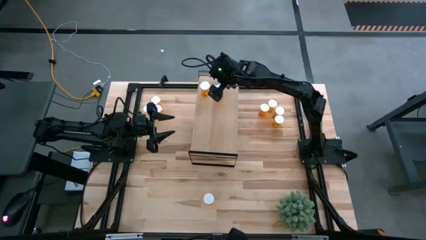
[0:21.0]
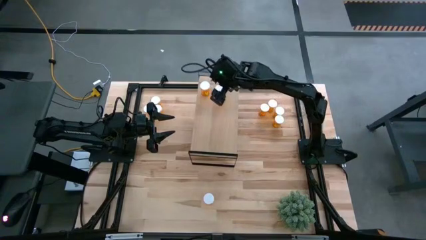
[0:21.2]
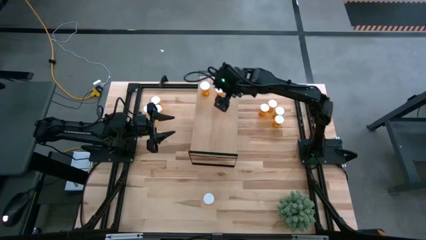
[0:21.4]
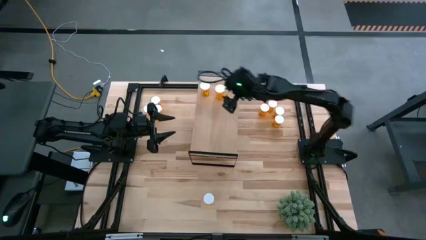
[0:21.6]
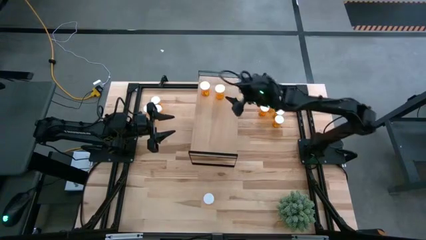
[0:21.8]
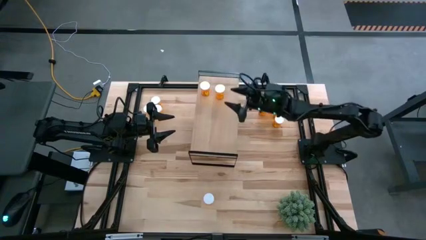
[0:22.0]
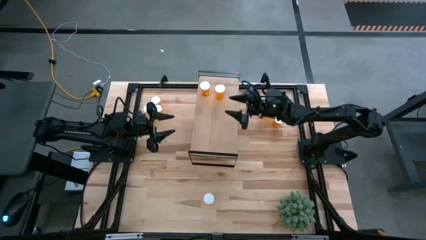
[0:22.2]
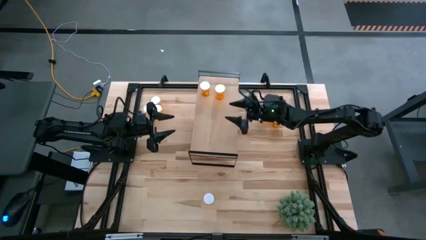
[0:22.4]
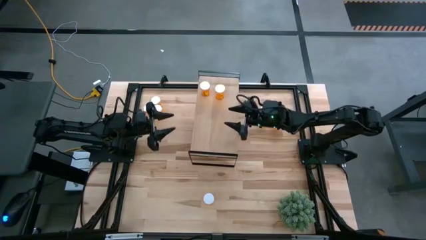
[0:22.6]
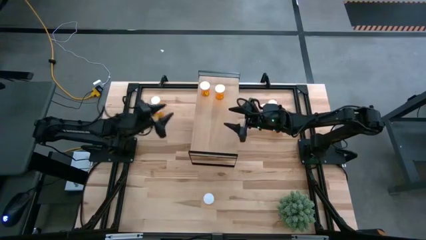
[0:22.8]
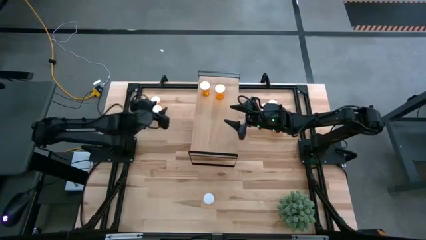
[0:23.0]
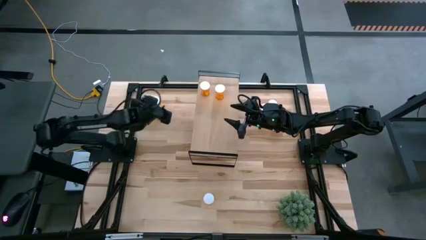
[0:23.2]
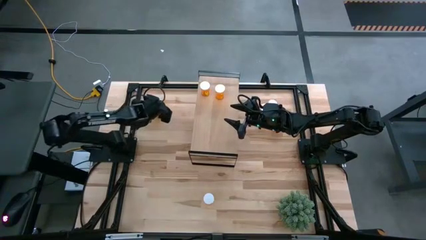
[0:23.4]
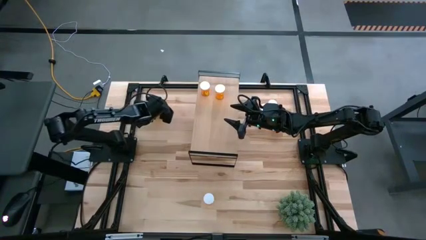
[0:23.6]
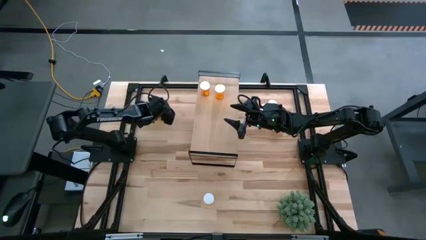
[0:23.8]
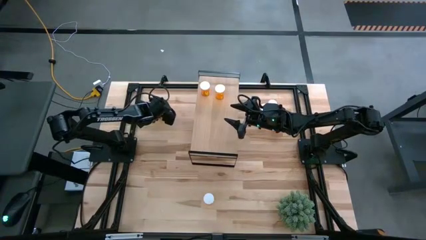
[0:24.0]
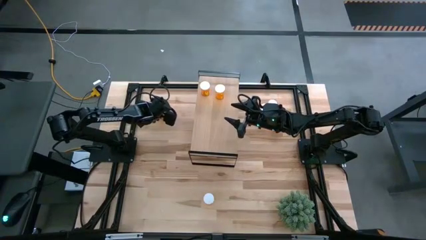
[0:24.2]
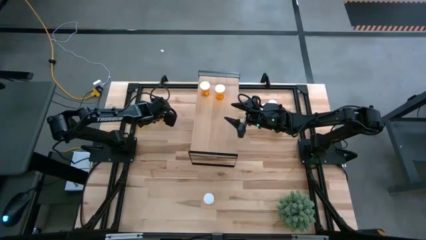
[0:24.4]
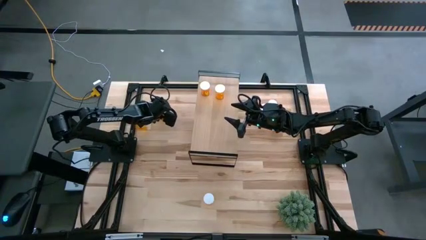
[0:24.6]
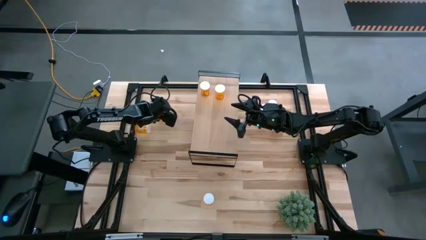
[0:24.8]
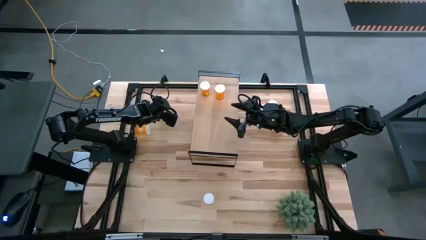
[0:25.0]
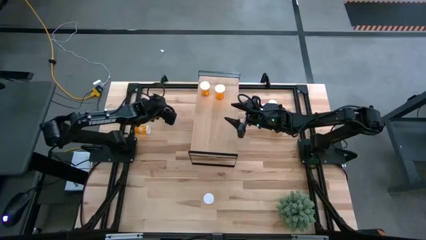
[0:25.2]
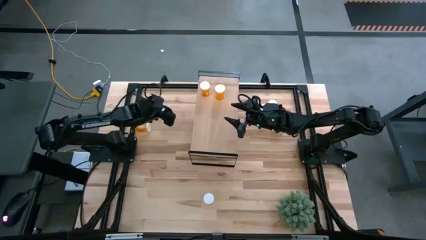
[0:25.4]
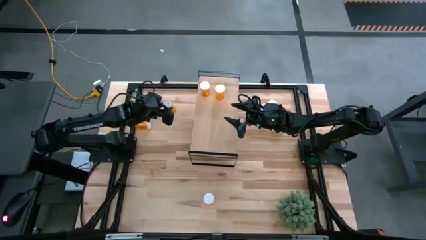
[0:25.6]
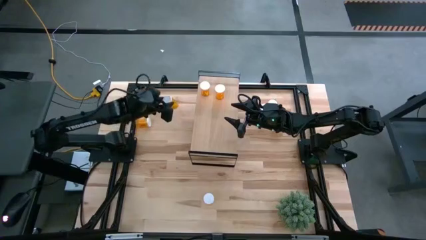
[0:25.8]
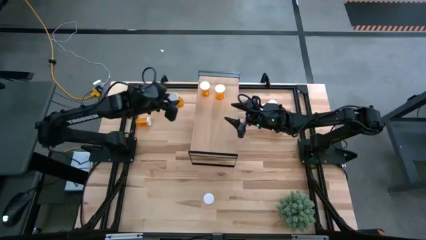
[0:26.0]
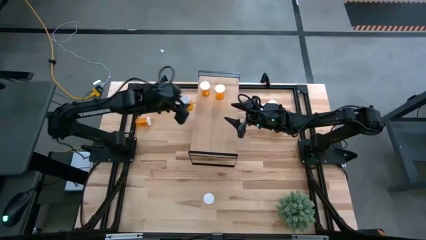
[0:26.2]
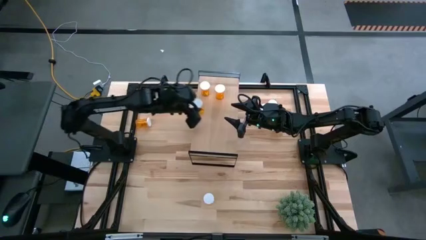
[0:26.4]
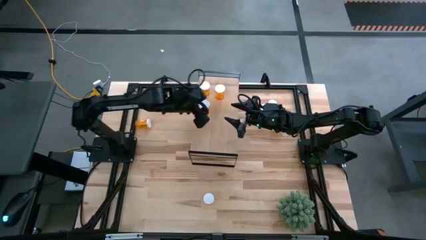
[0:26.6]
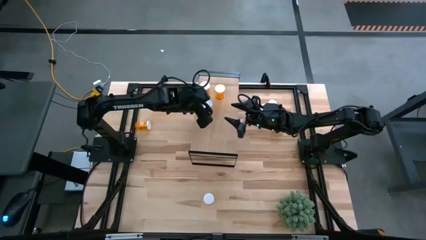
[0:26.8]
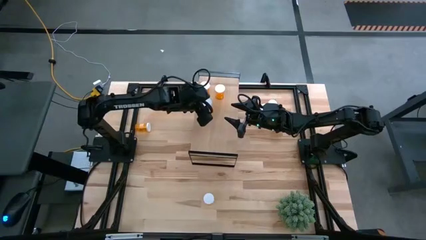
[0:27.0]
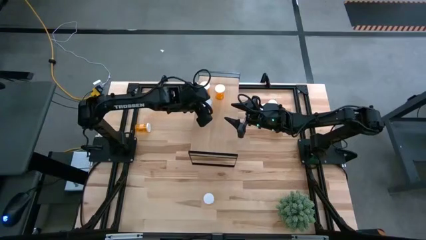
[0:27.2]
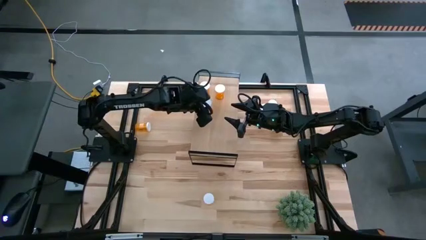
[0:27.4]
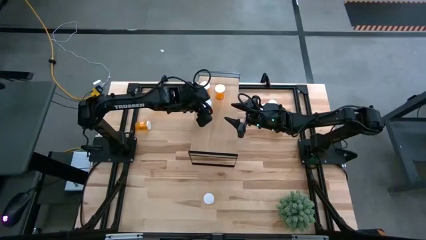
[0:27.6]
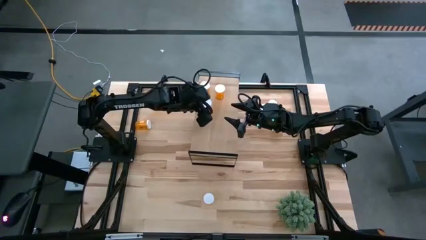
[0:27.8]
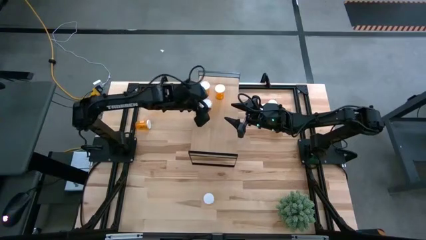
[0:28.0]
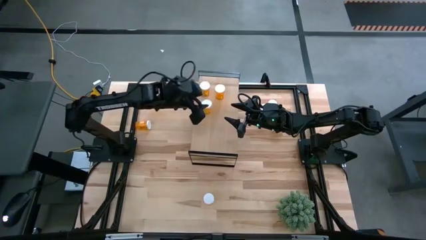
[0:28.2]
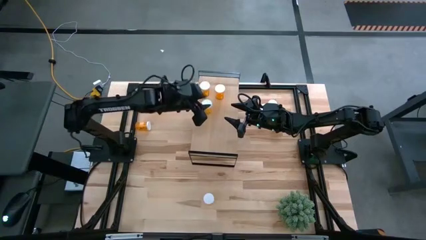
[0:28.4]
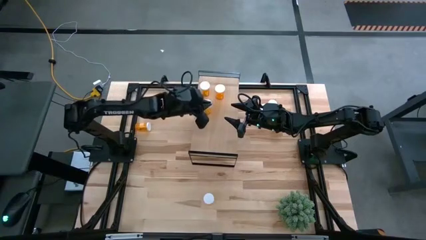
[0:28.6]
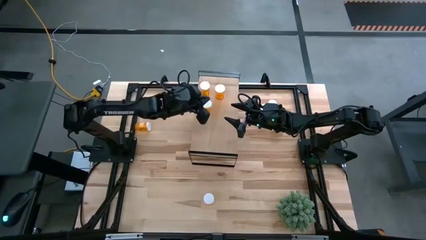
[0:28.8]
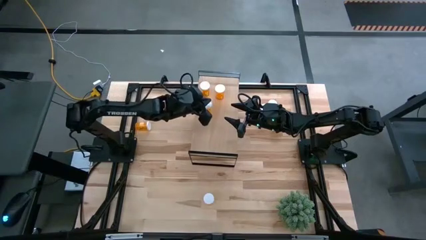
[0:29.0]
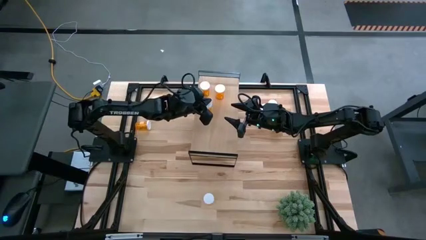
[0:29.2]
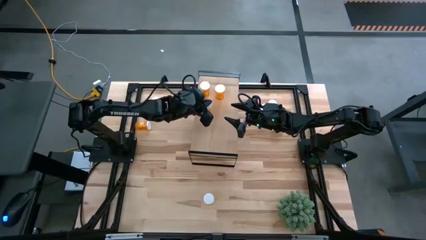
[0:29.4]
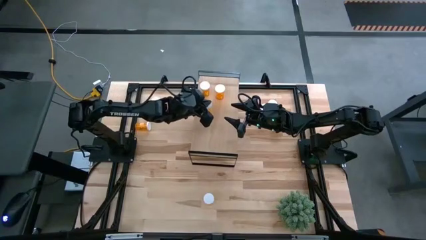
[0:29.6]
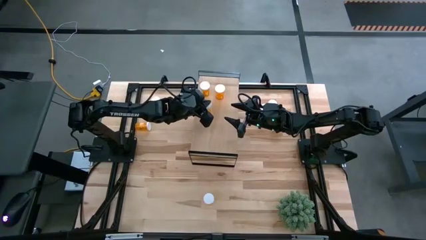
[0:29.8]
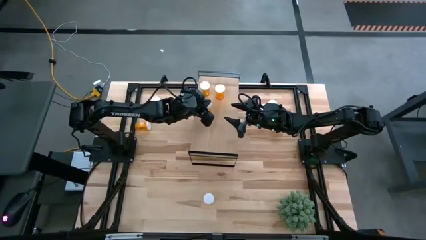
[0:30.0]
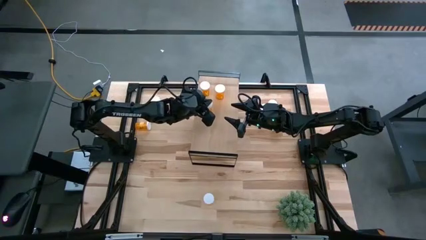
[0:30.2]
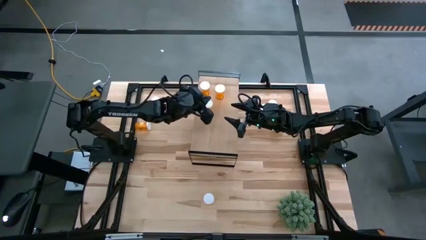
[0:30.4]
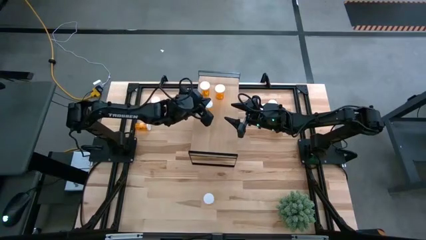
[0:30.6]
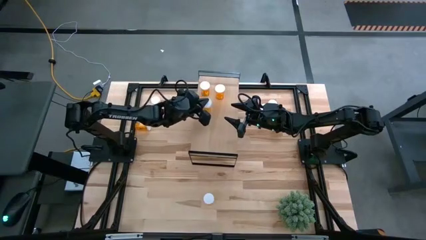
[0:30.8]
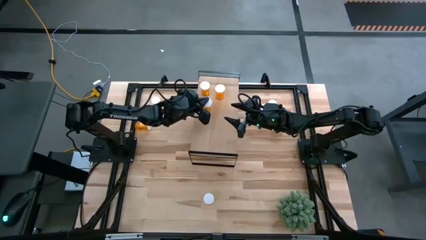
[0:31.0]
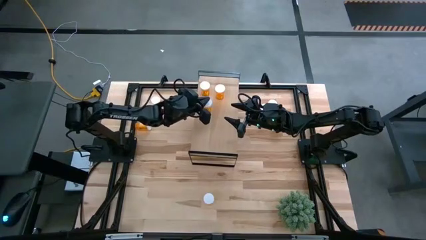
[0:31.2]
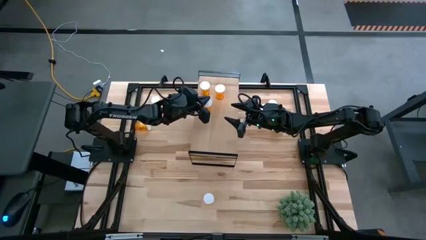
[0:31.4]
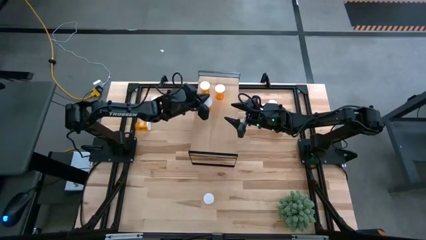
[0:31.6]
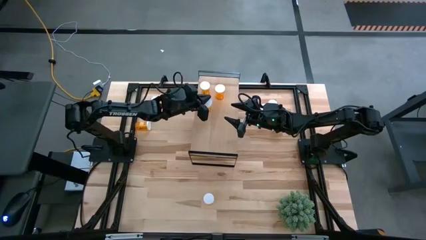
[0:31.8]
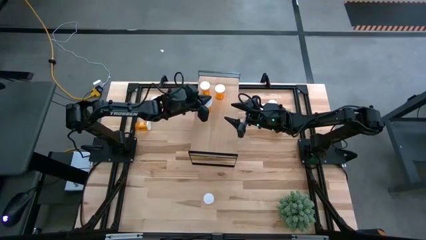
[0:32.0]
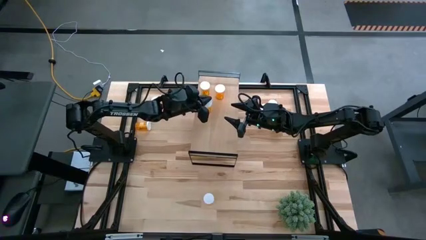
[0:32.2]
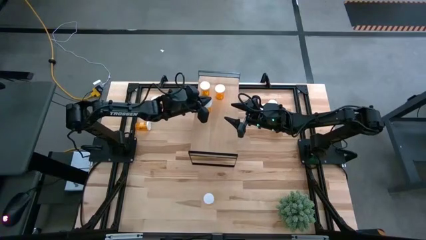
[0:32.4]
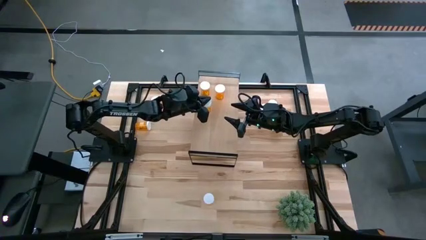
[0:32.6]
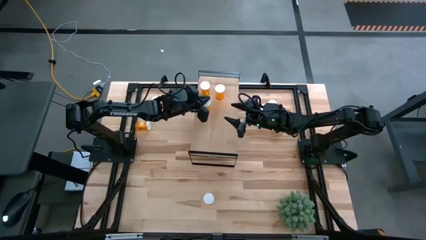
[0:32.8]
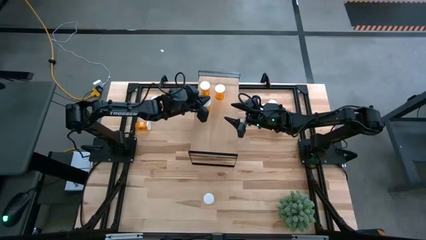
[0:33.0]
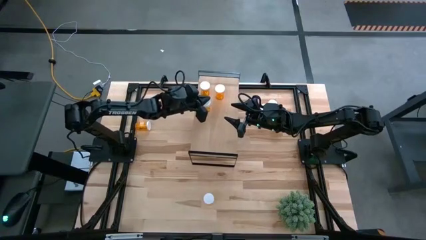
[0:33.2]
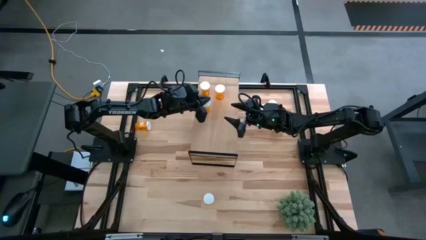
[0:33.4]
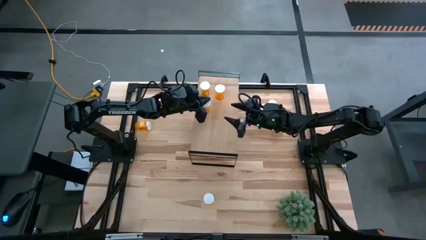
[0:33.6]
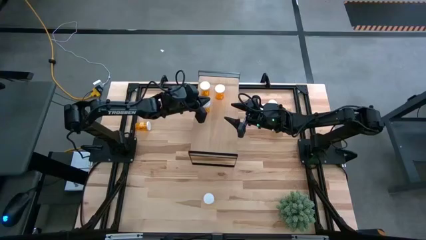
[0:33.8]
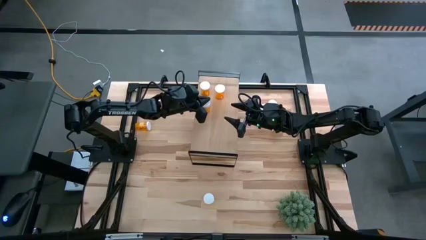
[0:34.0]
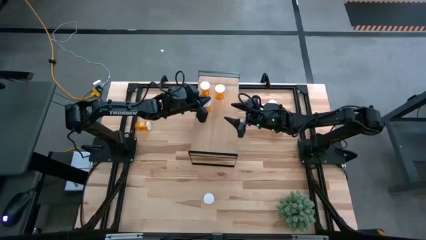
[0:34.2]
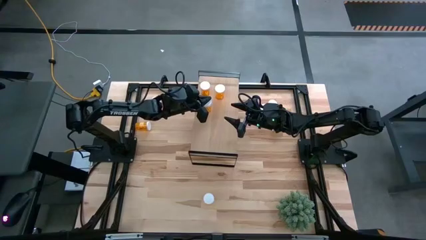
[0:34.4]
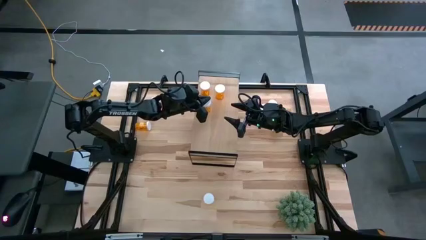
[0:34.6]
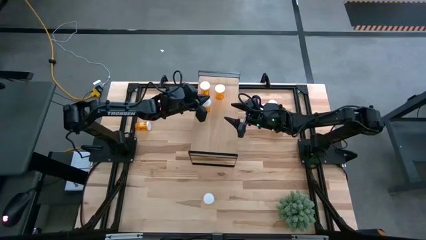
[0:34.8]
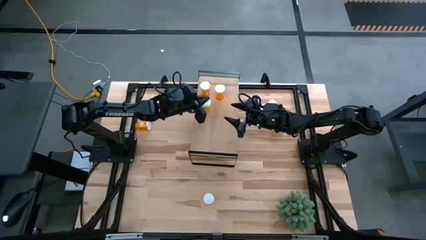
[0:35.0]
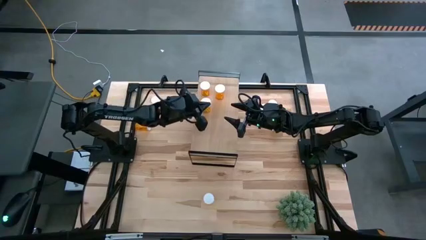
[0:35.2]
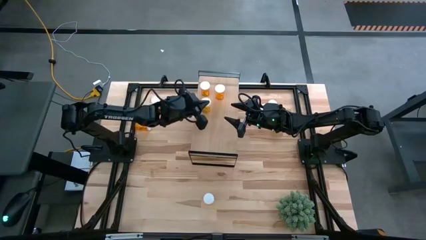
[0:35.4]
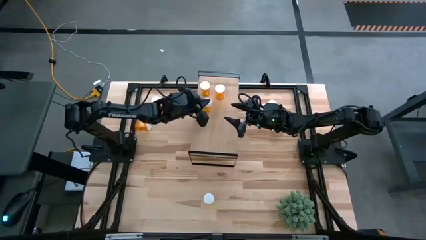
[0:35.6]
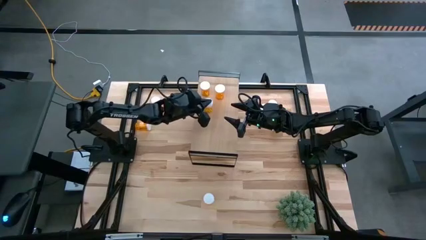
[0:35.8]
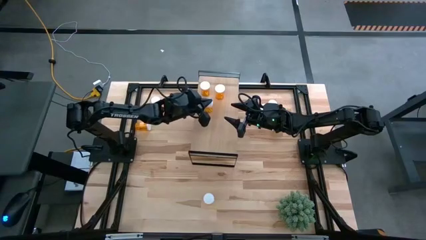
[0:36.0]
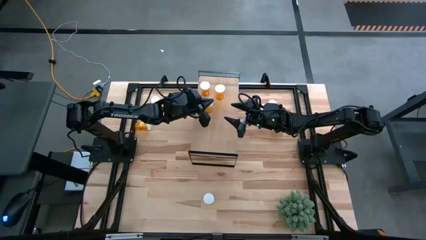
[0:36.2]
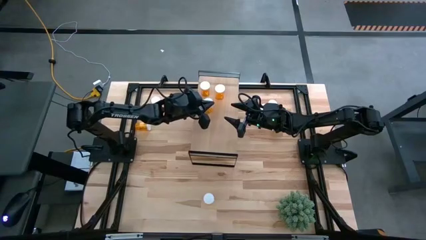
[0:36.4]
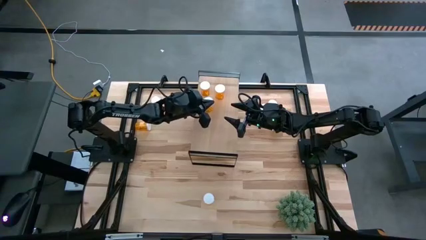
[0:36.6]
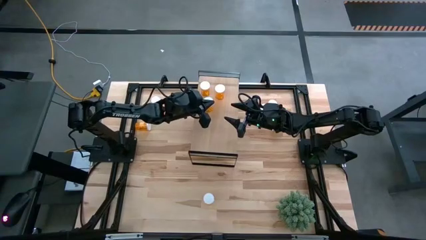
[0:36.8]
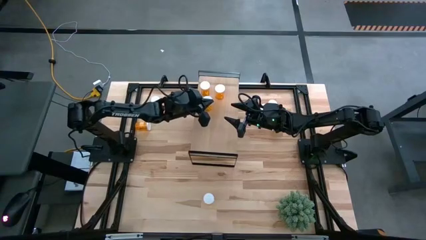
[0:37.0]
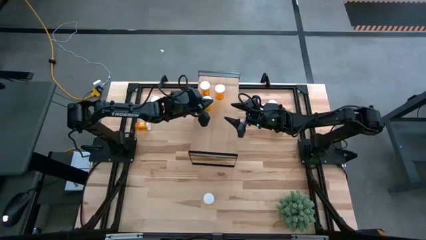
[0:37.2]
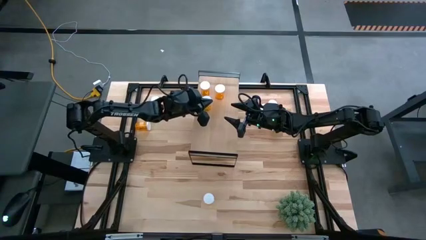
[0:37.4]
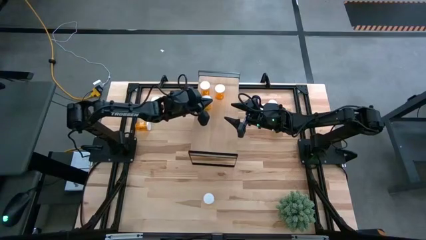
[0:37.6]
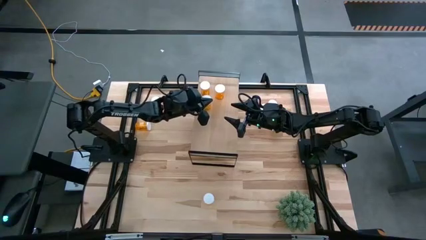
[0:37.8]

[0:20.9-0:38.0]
Task: Pick and place medicine bottles onto shelf by color
Put the orange pill bottle on the shelf
